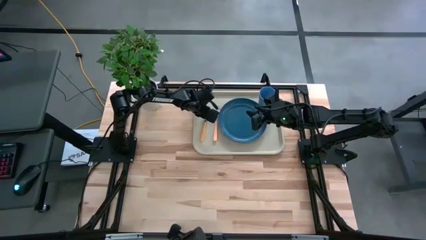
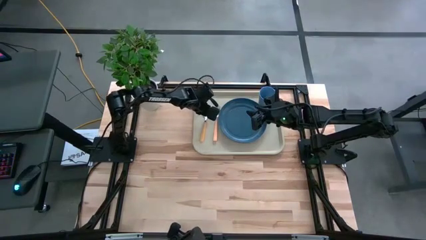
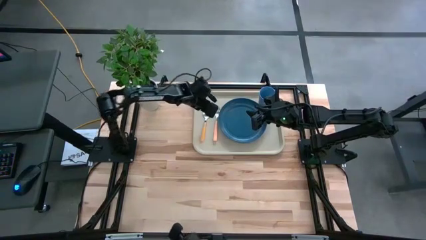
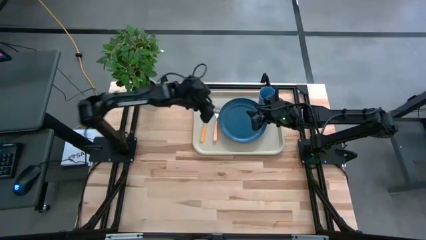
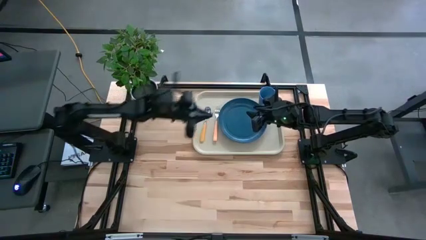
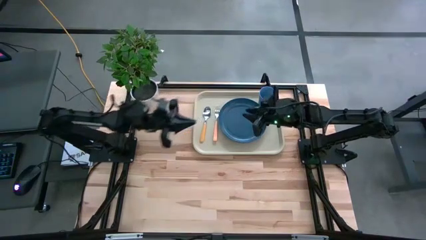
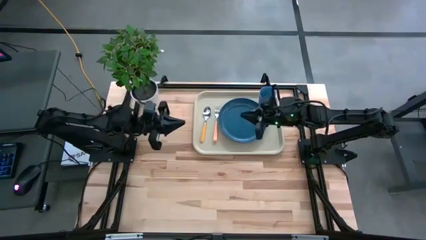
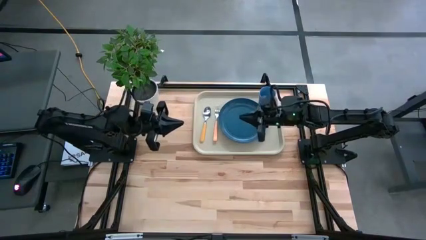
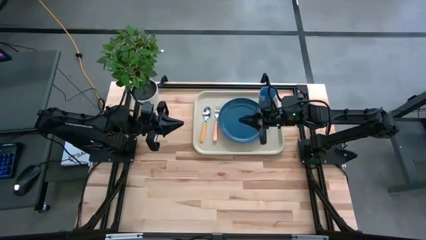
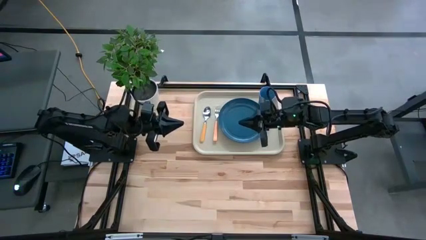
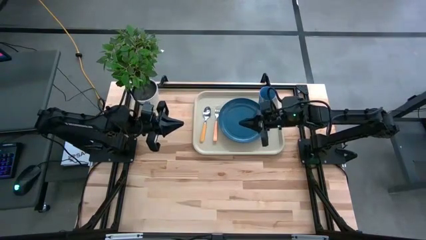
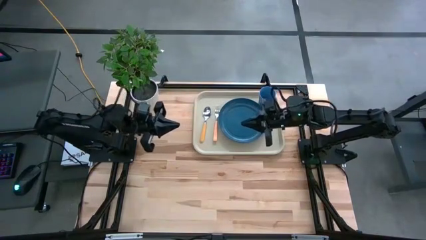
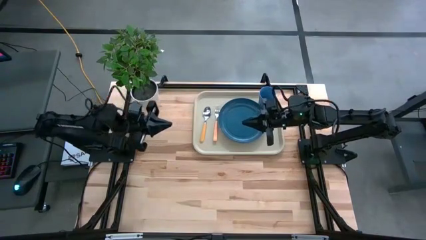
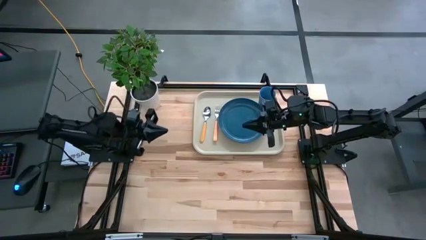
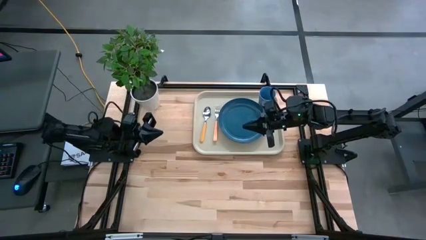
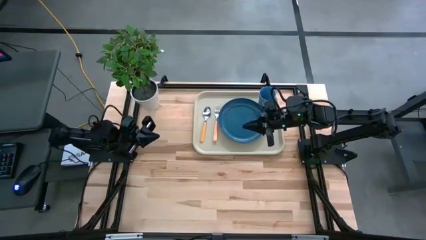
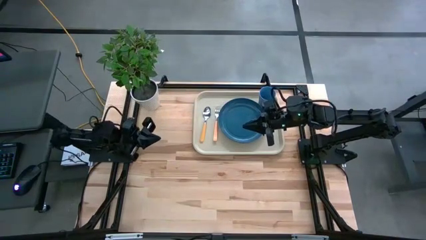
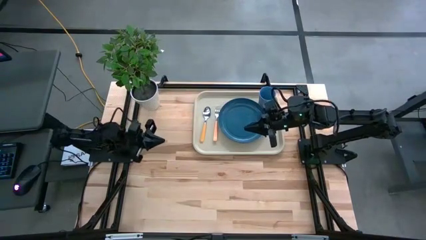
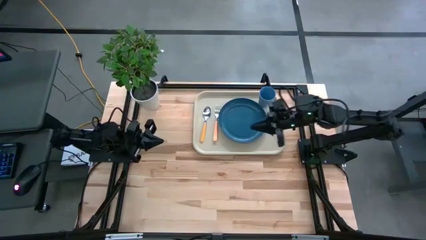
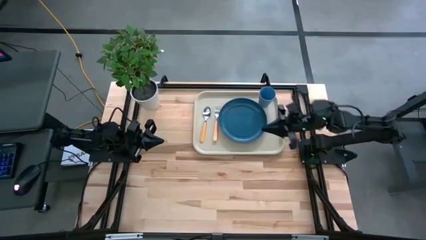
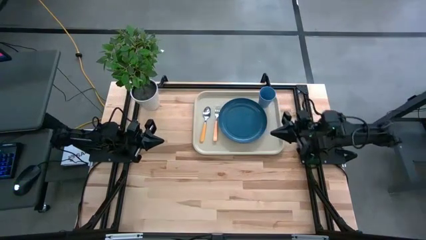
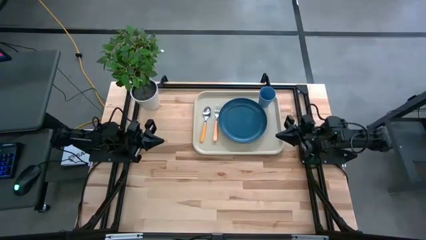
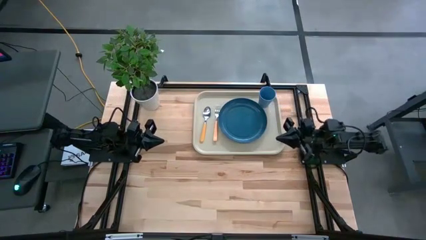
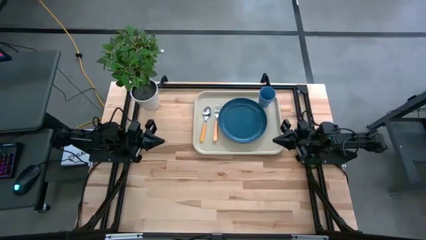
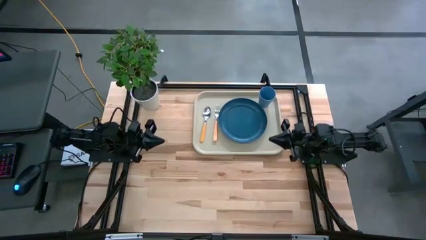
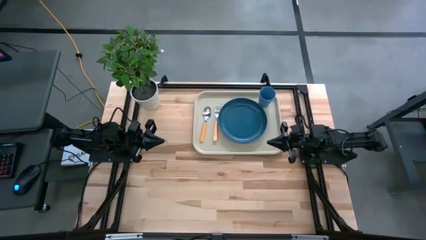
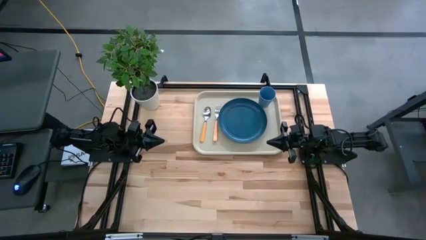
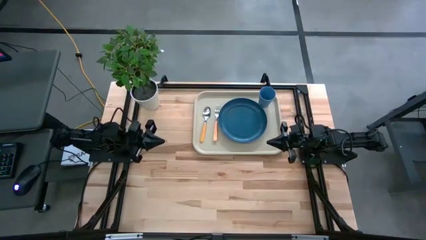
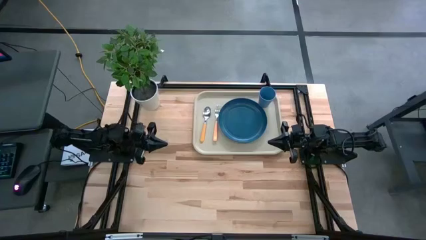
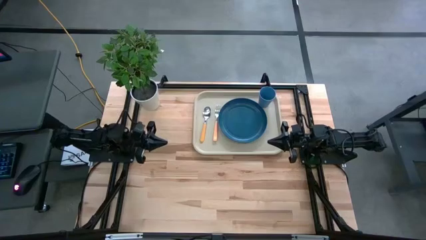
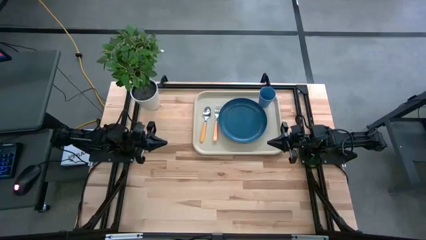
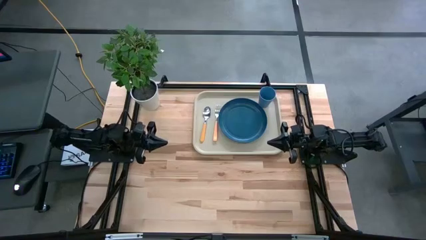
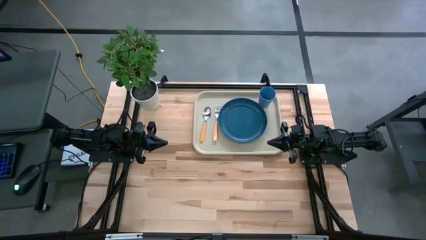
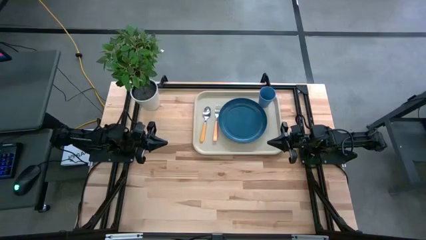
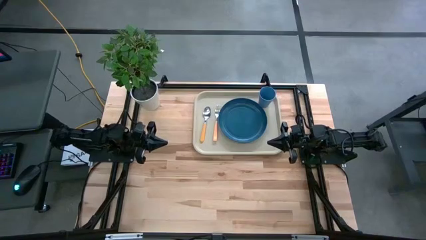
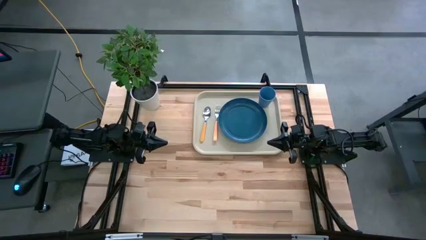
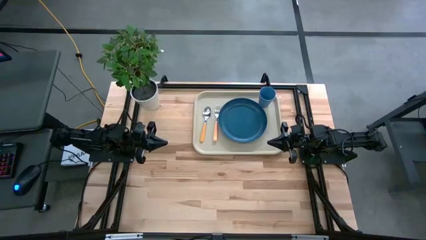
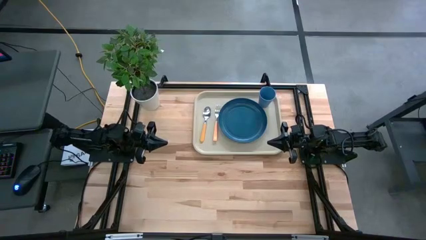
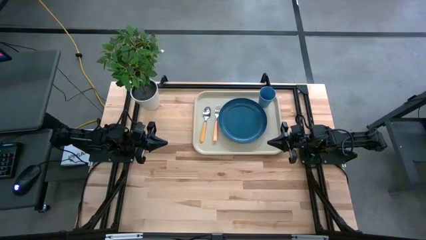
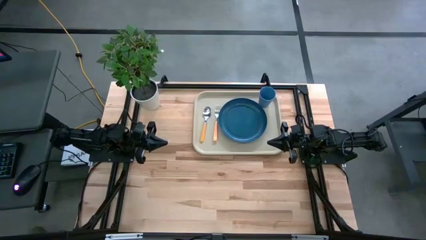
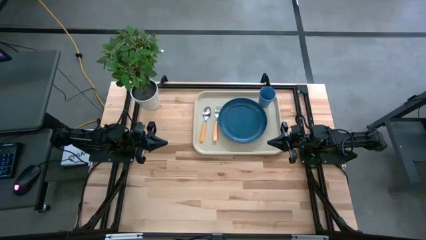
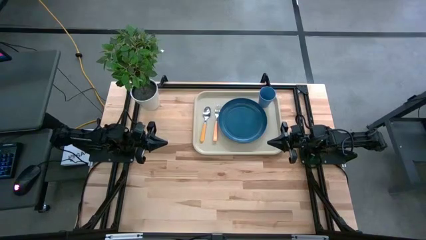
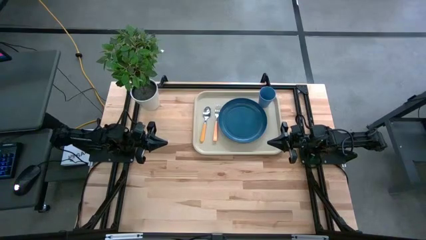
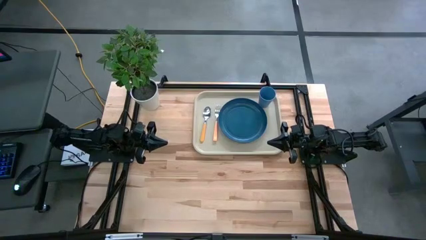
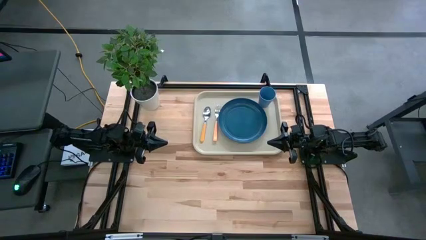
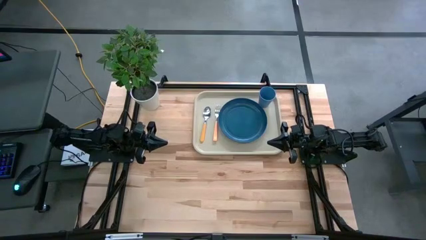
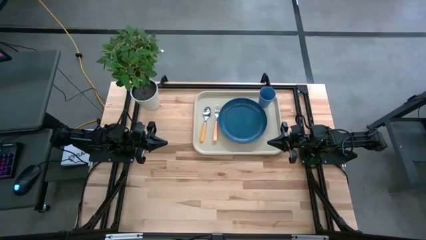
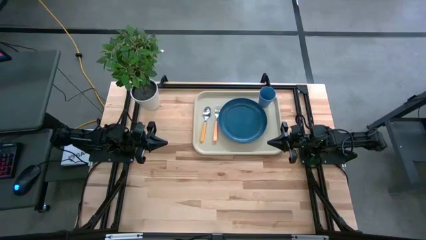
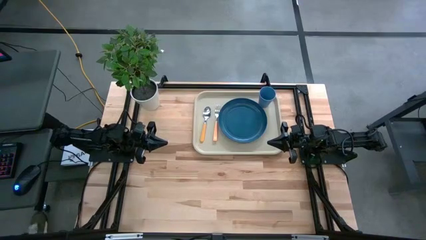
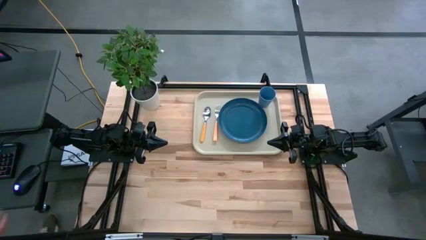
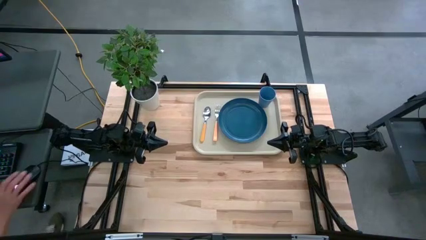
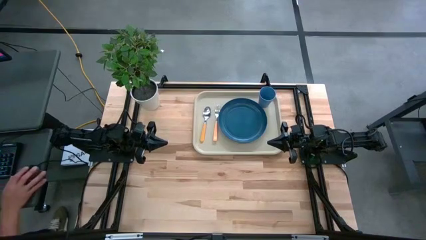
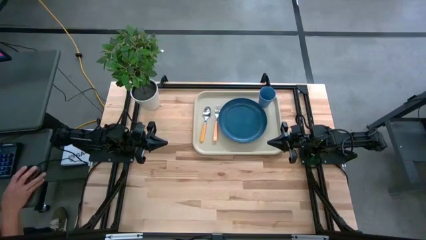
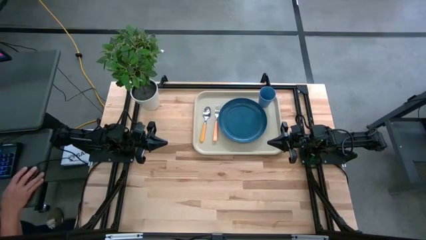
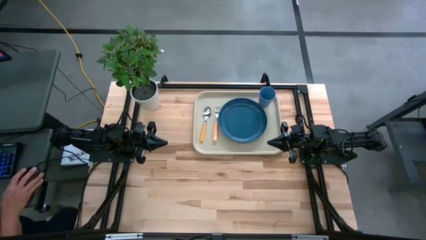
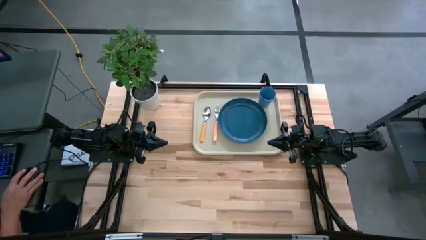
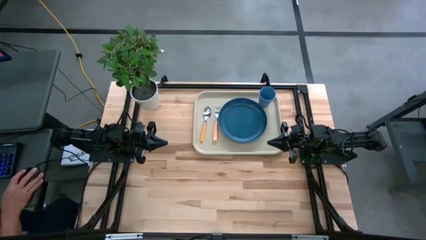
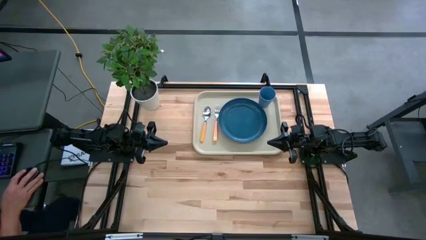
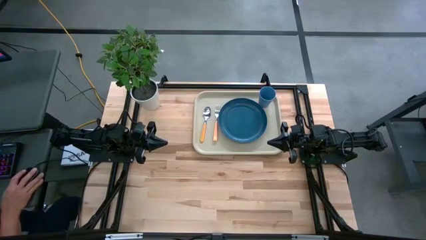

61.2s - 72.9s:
Task: Pick and place plate/cup/fork/spoon on tray
Return to Home Position
